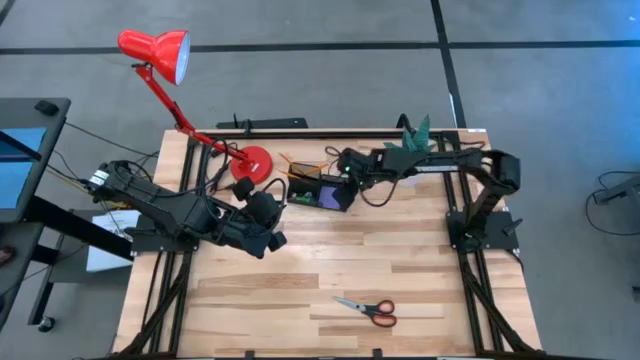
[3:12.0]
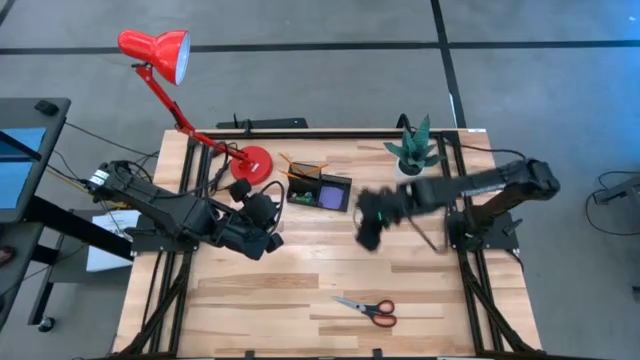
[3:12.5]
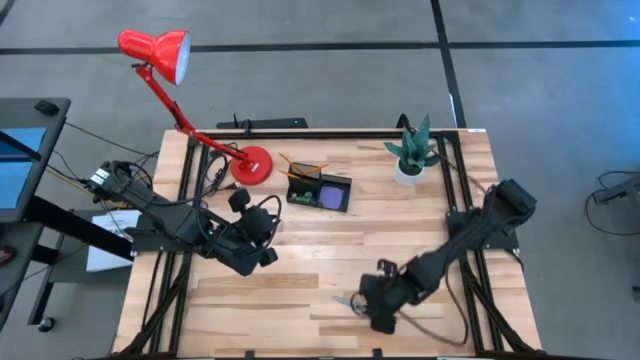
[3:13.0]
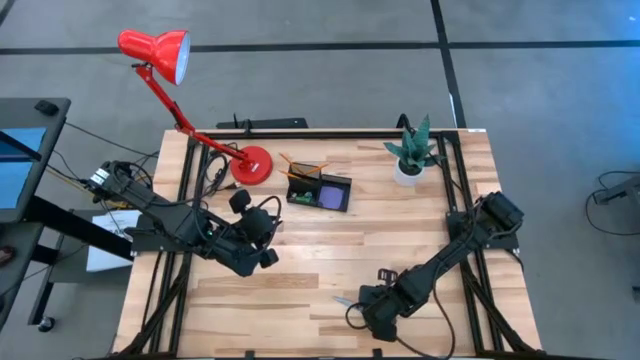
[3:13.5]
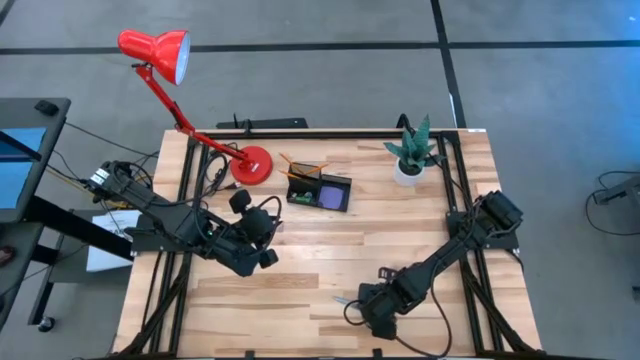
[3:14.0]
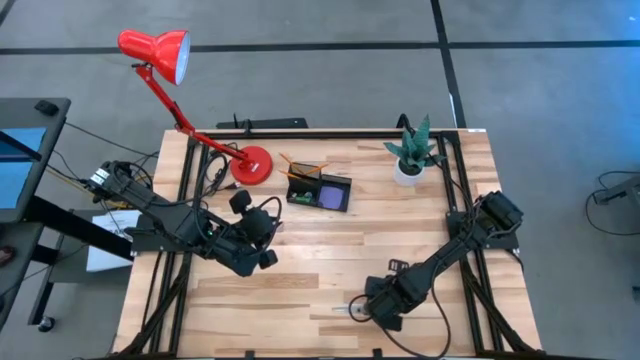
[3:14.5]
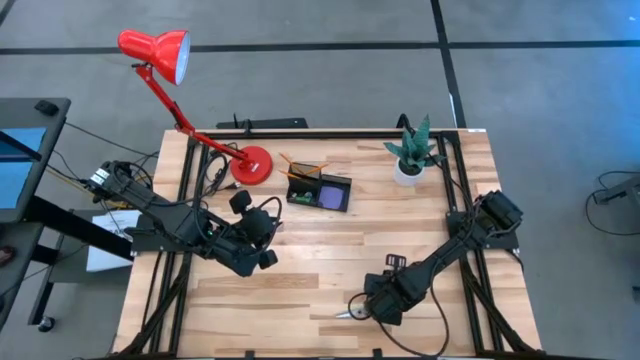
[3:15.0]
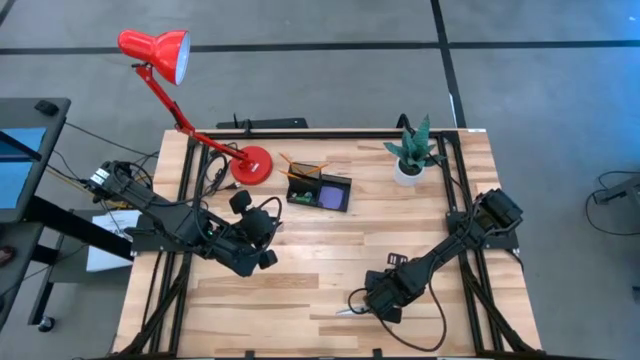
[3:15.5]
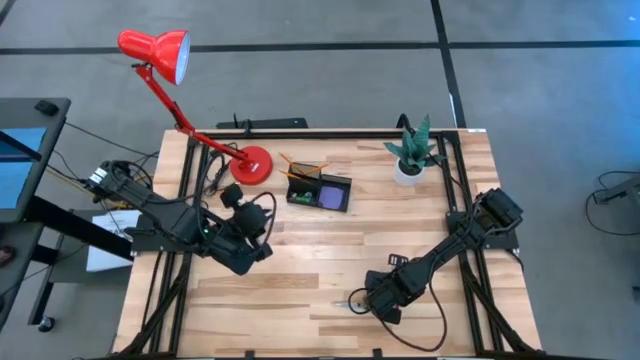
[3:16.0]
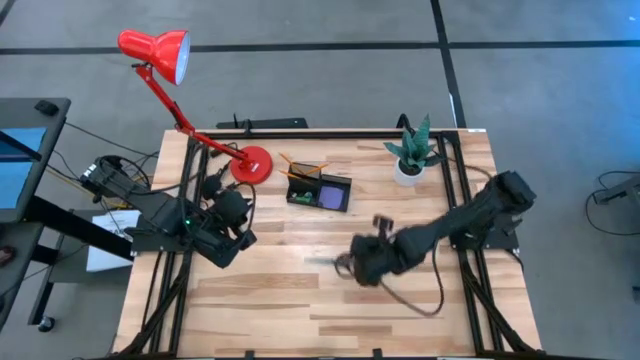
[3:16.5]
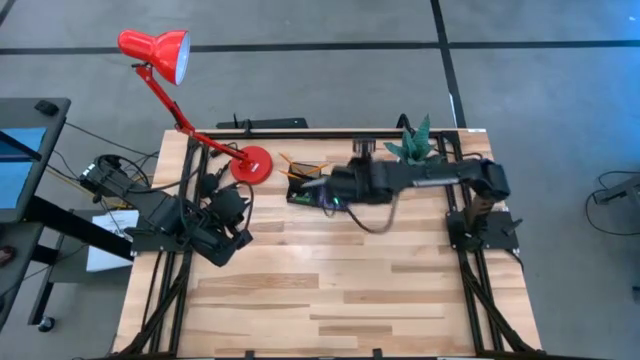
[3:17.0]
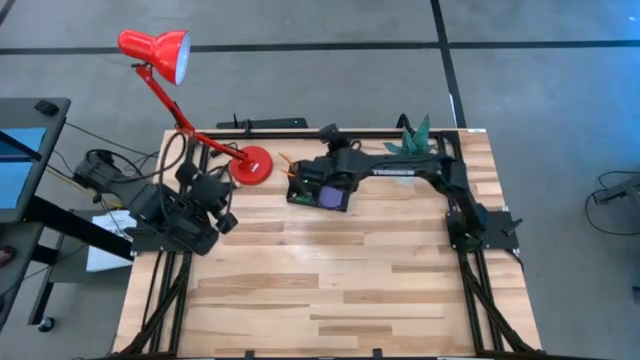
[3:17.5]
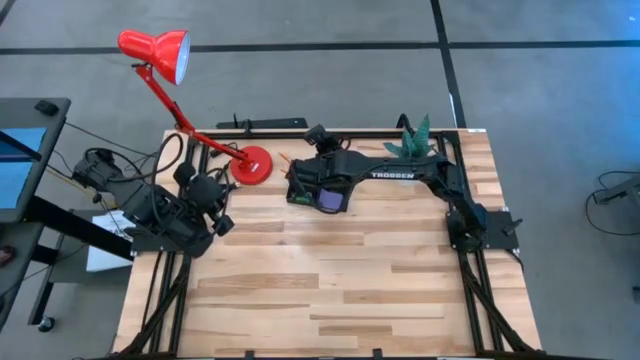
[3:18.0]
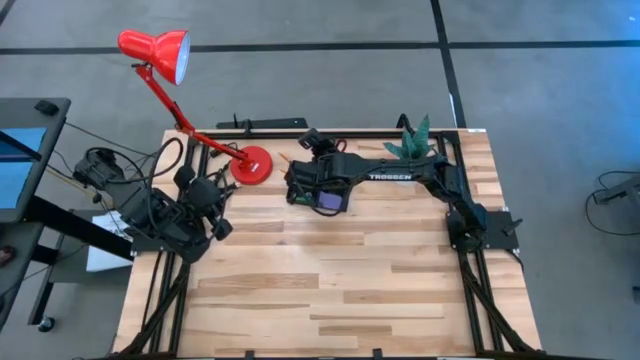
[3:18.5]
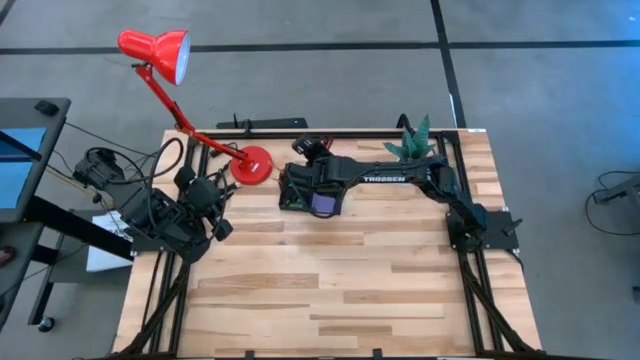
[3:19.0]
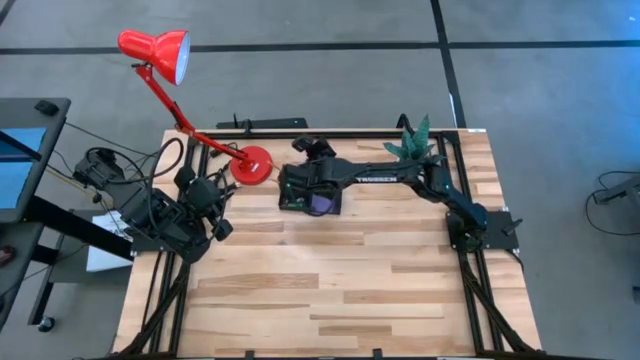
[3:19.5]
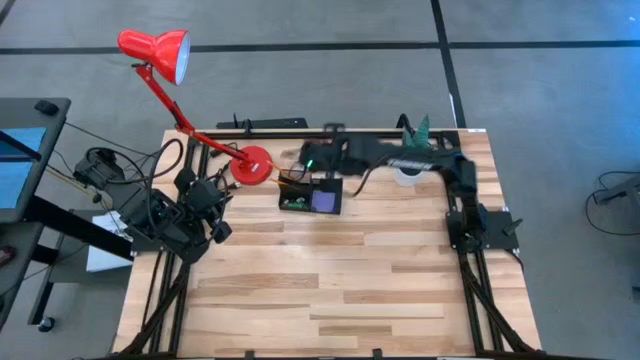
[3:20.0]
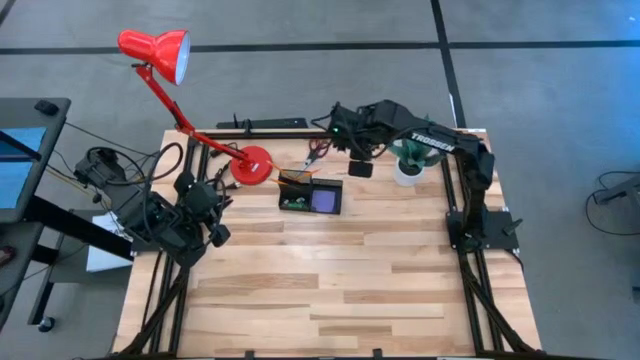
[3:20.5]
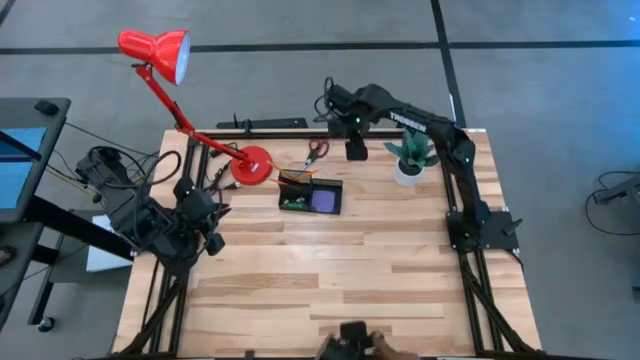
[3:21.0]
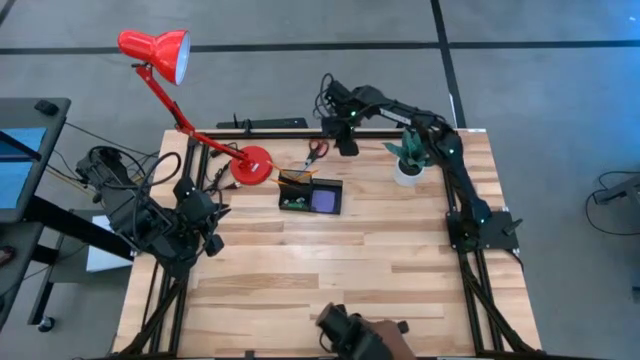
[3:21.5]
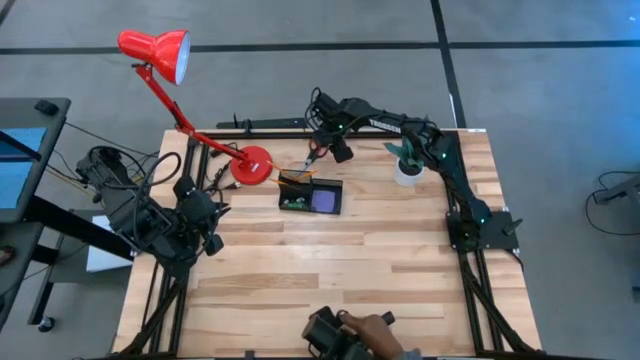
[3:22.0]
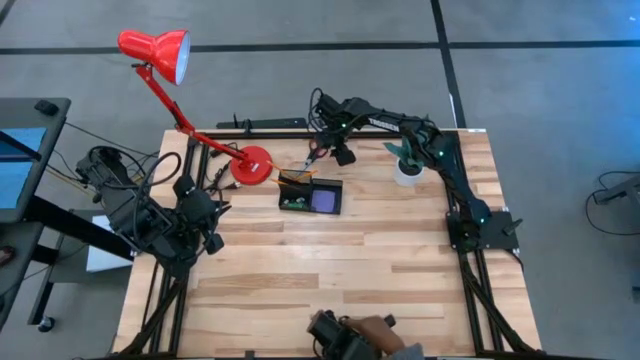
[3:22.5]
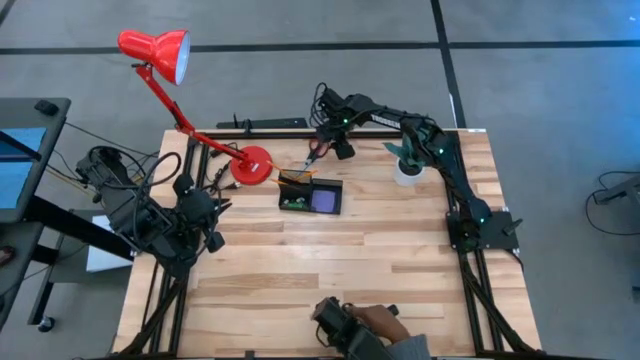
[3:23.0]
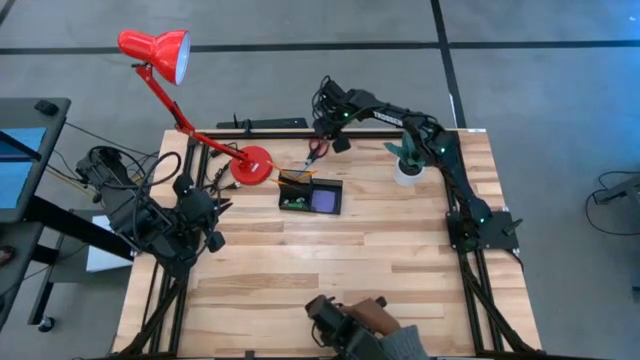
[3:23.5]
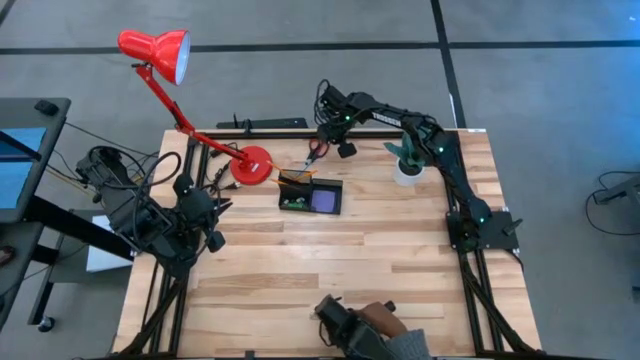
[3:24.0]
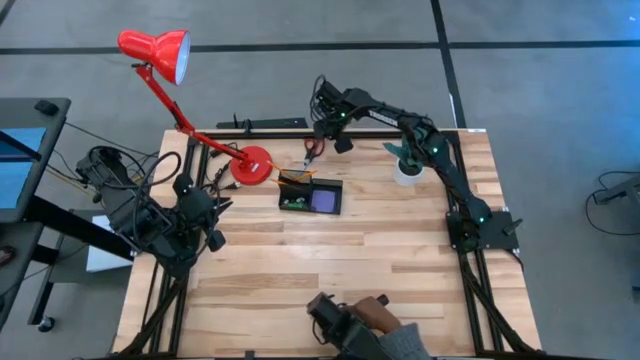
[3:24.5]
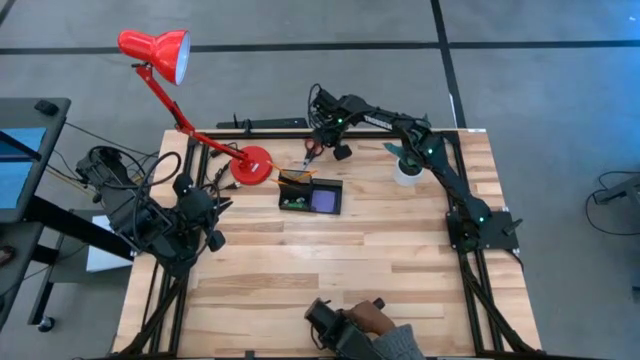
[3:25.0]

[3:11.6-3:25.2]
Task: Pick and place office supplies into organizer
Put the black scissors into the black desk organizer

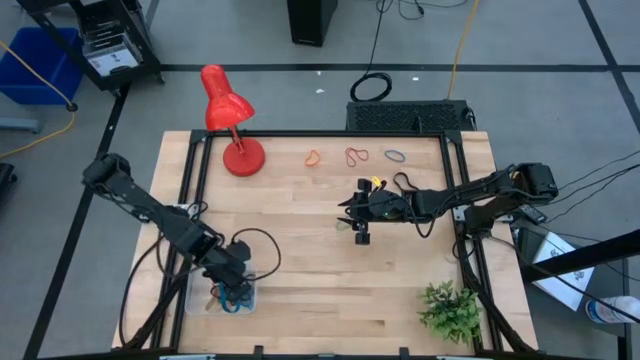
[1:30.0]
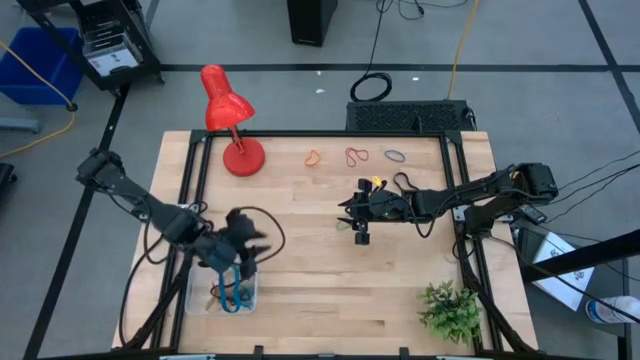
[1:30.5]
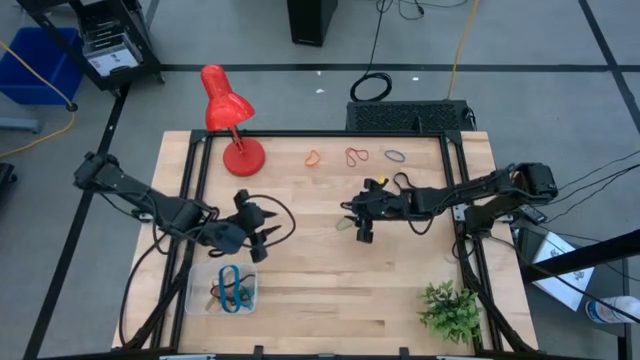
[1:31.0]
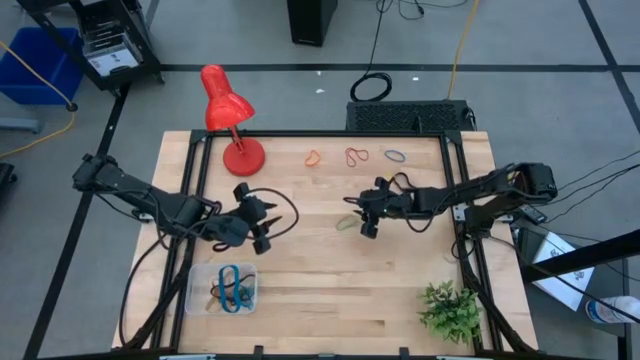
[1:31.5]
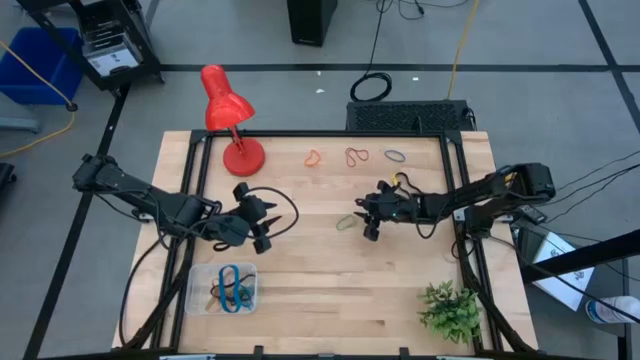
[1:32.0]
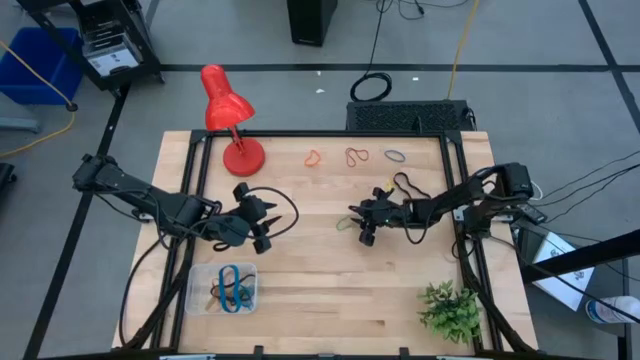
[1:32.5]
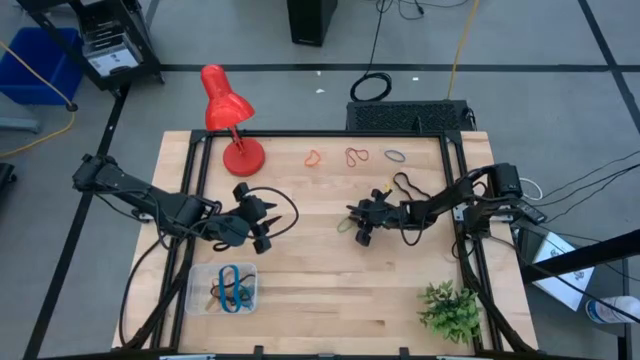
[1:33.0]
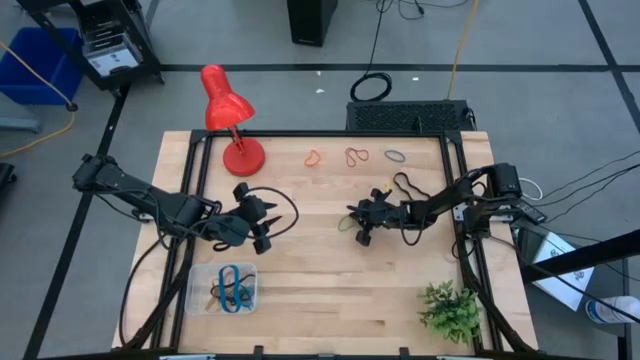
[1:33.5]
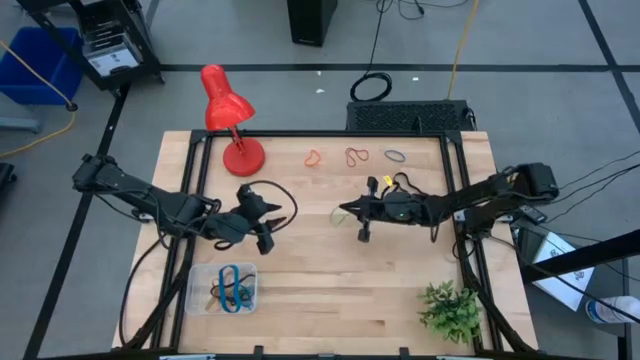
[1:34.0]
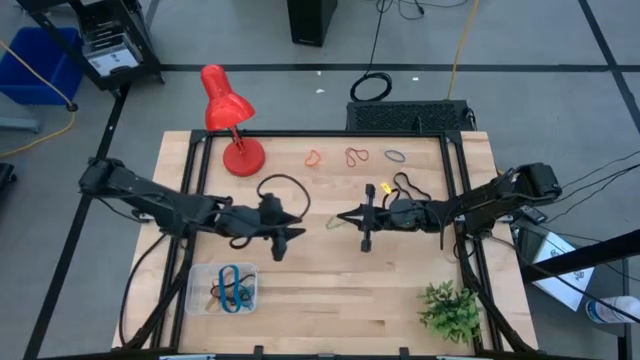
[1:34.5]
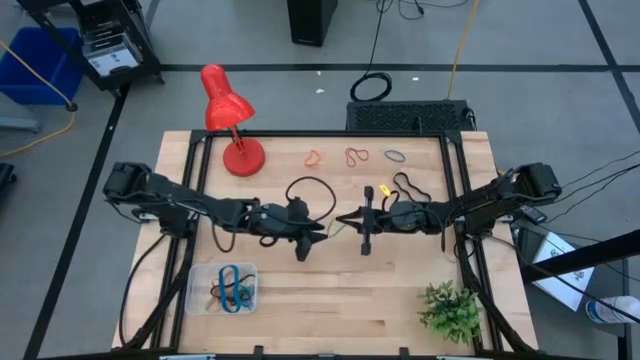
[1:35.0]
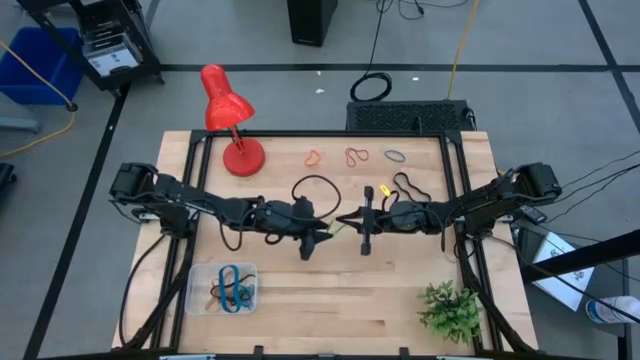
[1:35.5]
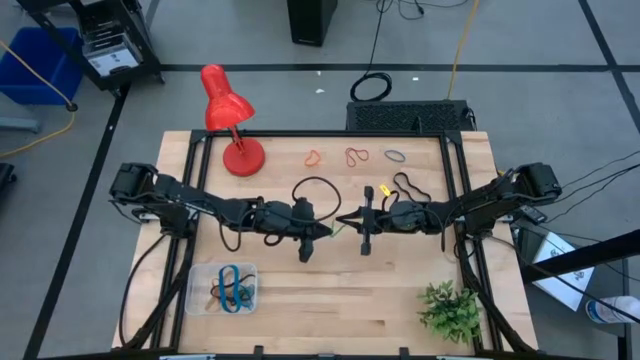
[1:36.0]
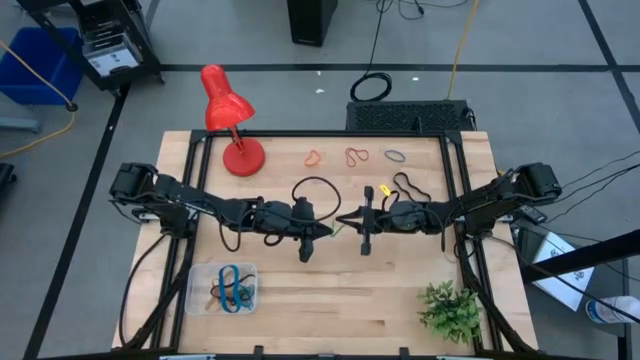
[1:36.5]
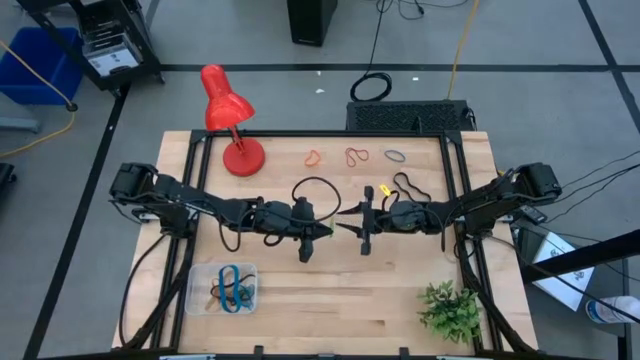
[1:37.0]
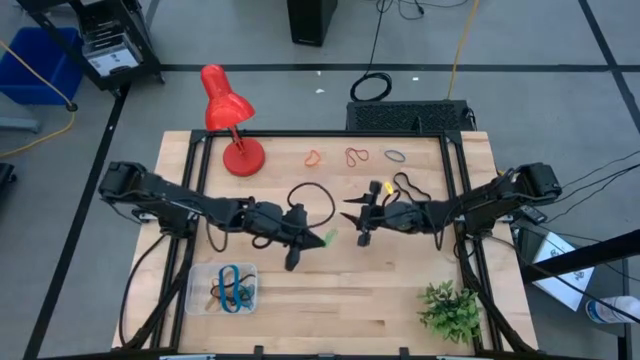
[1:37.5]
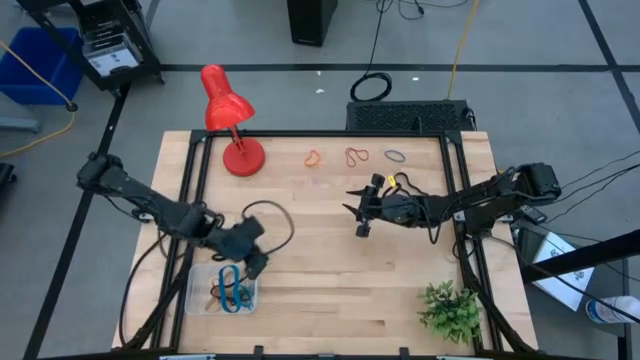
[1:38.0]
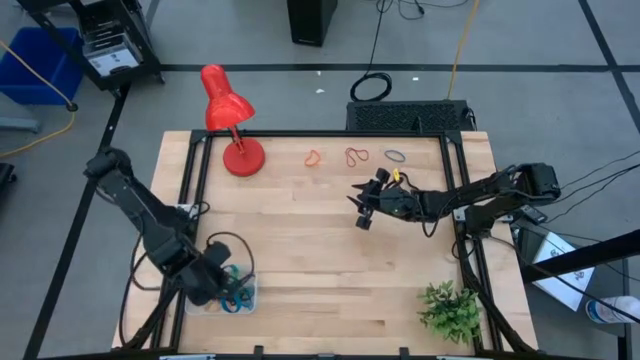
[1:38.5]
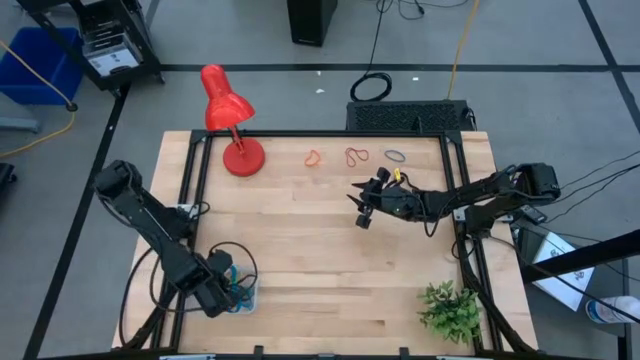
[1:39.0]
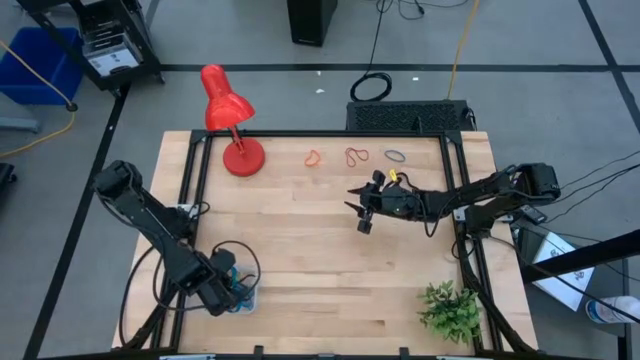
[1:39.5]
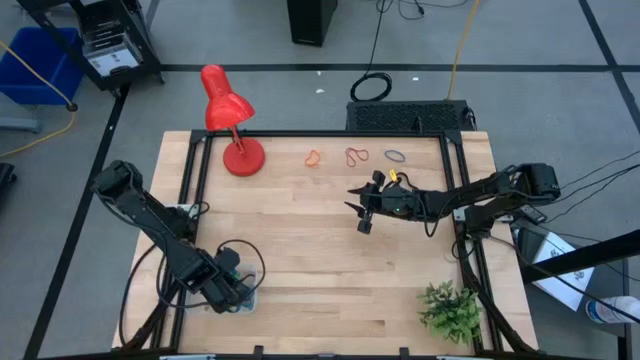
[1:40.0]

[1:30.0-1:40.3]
Task: Pick and place rubber bands into bin
Put the green rubber band into the transparent bin
